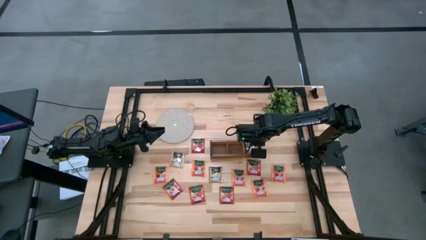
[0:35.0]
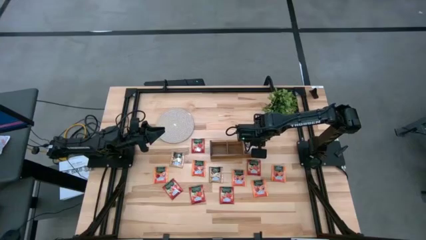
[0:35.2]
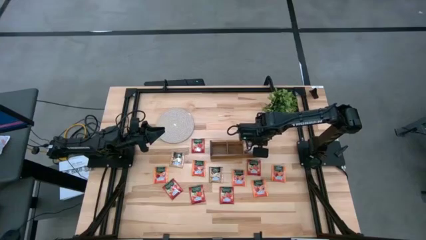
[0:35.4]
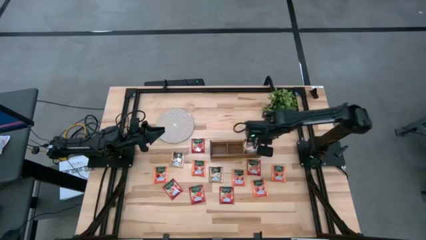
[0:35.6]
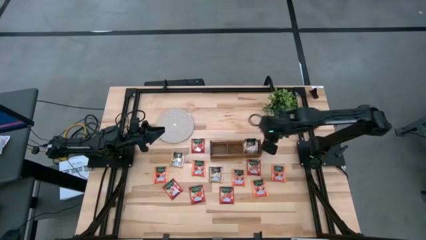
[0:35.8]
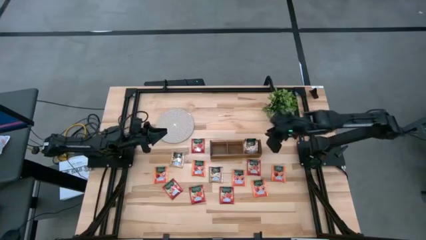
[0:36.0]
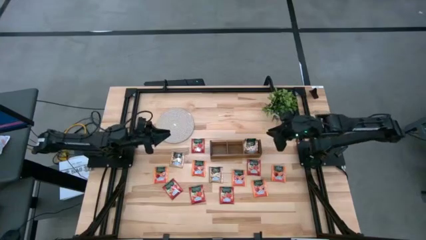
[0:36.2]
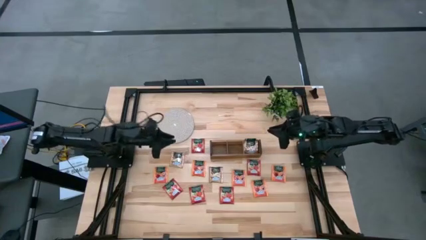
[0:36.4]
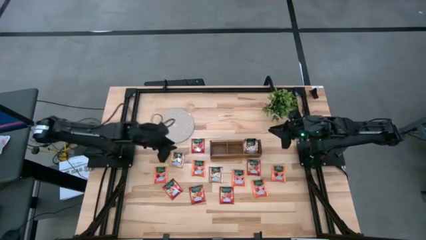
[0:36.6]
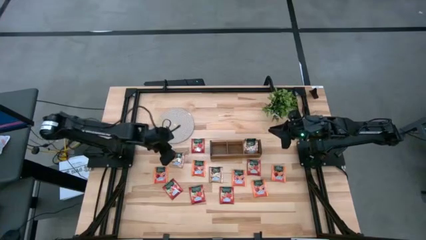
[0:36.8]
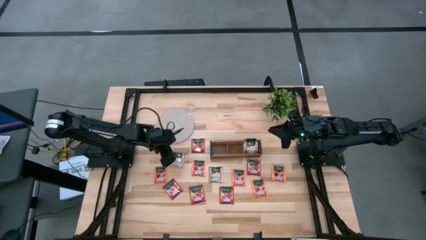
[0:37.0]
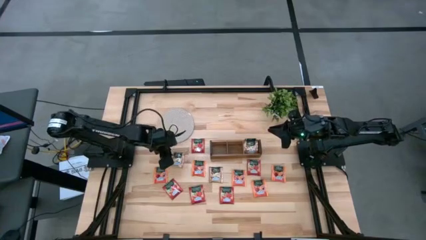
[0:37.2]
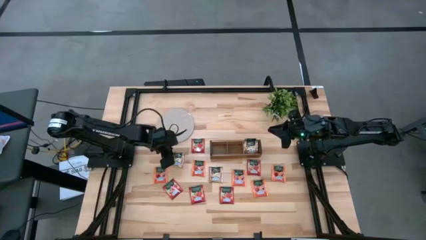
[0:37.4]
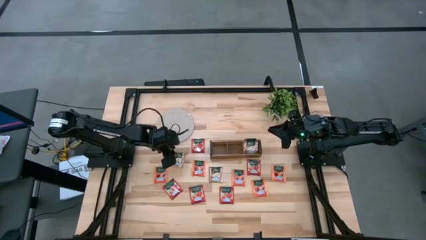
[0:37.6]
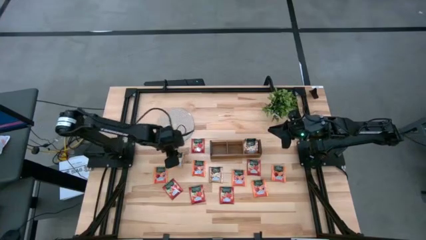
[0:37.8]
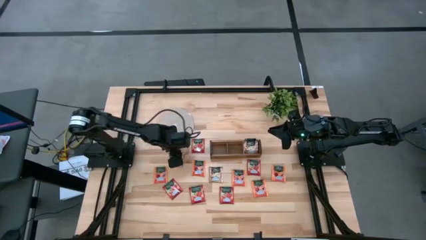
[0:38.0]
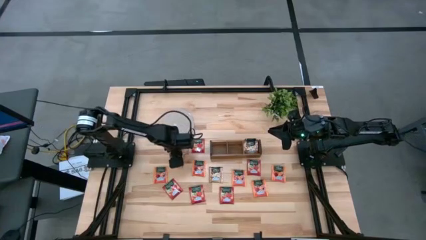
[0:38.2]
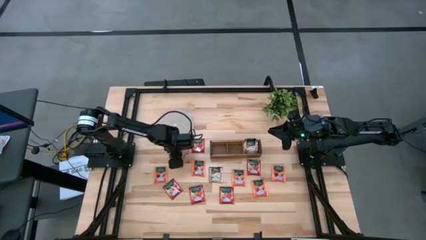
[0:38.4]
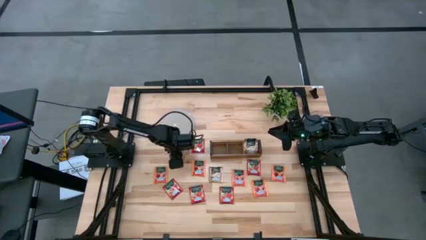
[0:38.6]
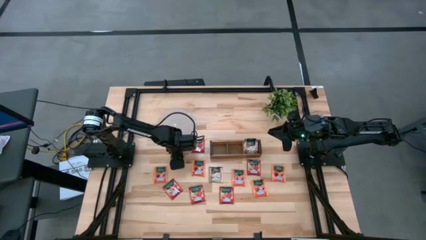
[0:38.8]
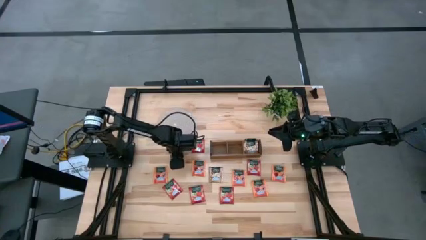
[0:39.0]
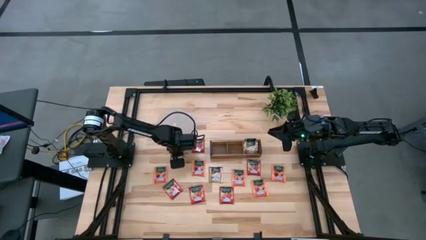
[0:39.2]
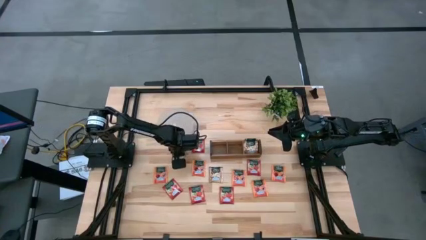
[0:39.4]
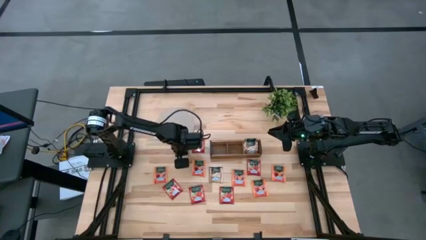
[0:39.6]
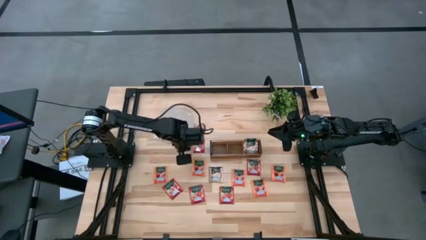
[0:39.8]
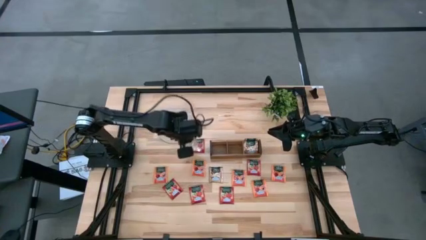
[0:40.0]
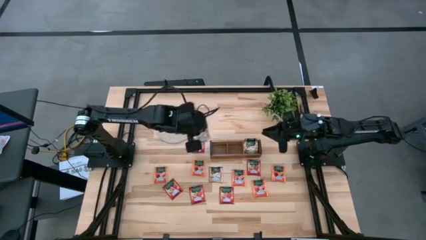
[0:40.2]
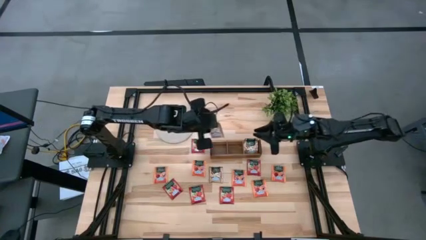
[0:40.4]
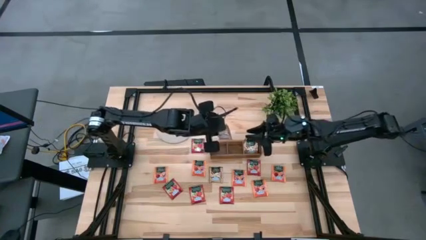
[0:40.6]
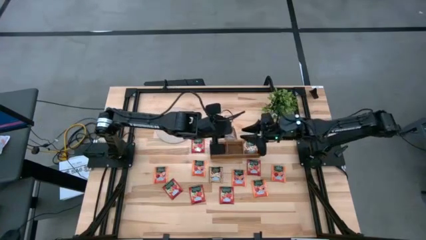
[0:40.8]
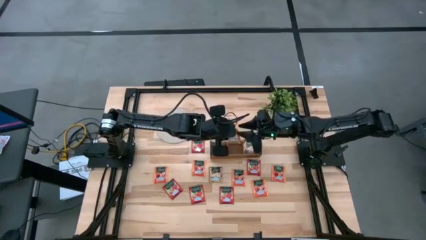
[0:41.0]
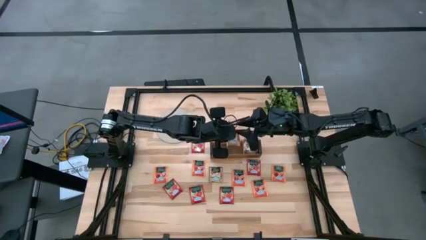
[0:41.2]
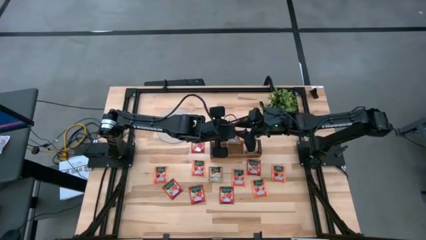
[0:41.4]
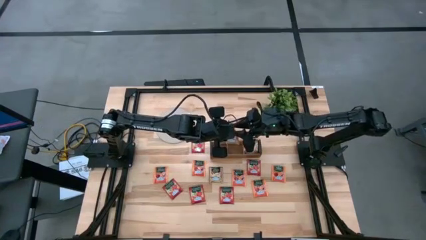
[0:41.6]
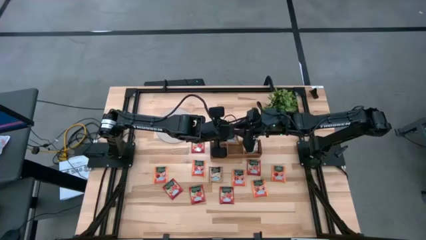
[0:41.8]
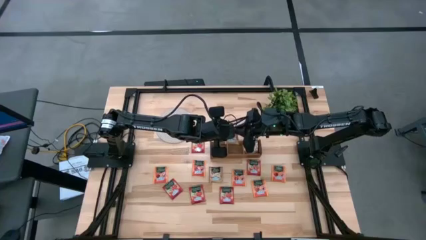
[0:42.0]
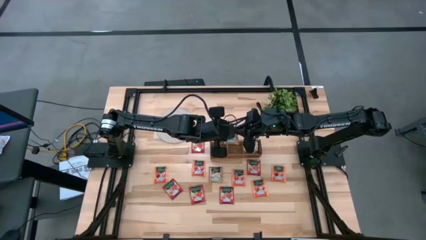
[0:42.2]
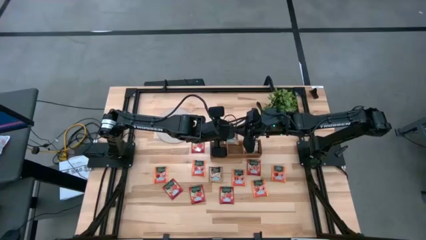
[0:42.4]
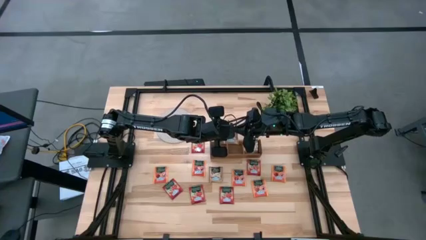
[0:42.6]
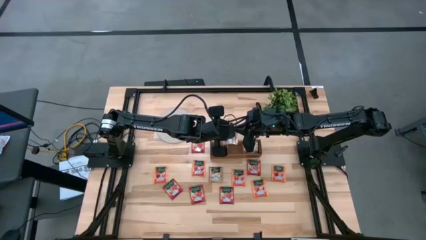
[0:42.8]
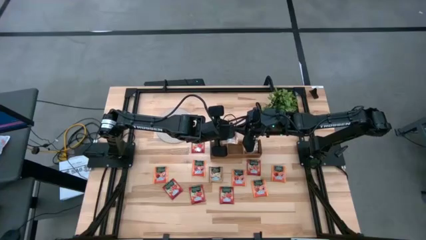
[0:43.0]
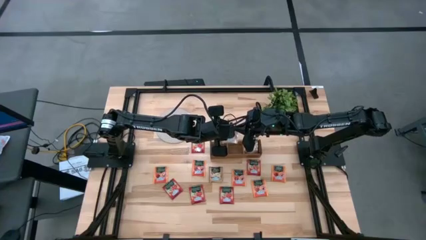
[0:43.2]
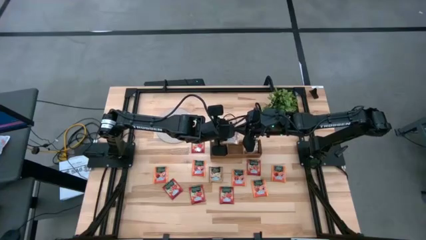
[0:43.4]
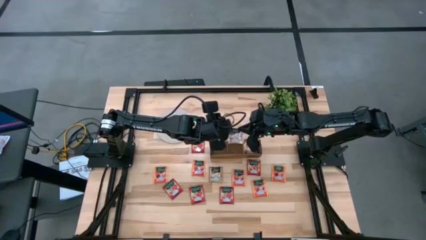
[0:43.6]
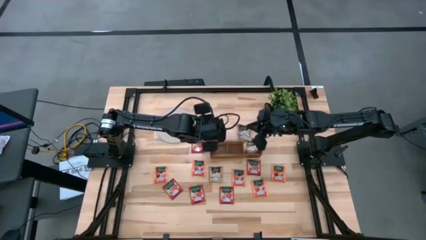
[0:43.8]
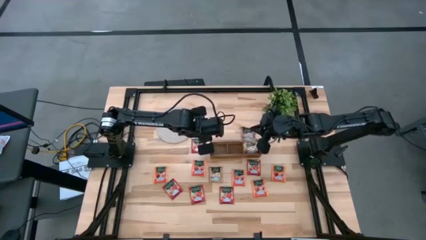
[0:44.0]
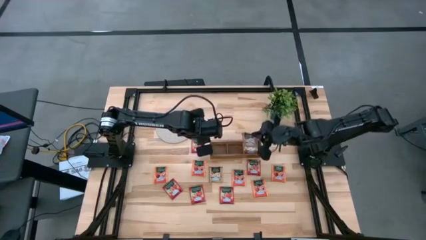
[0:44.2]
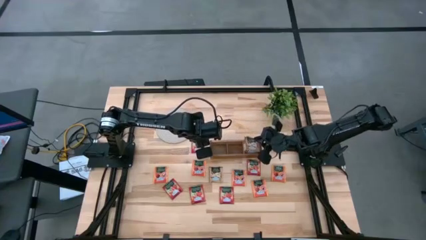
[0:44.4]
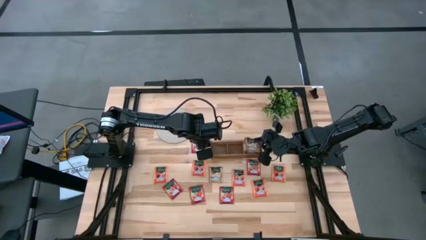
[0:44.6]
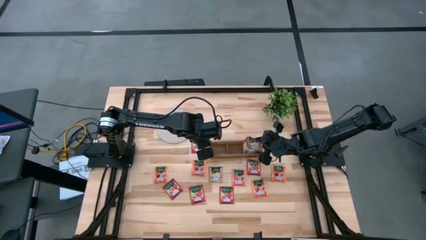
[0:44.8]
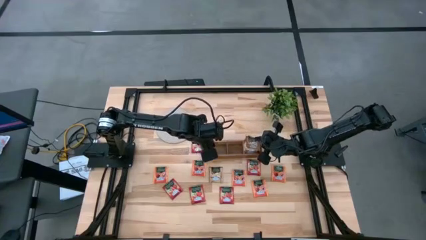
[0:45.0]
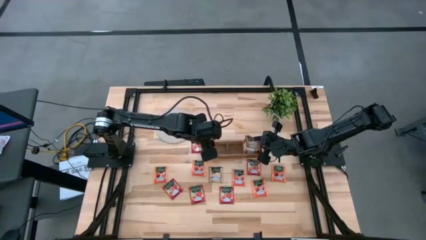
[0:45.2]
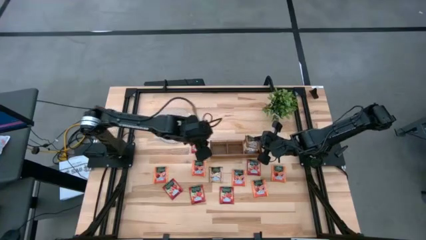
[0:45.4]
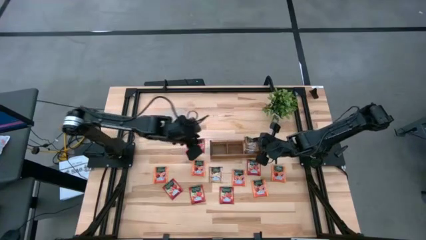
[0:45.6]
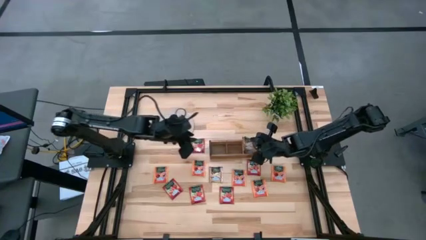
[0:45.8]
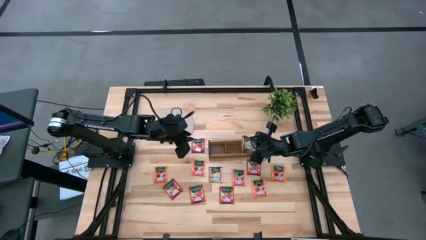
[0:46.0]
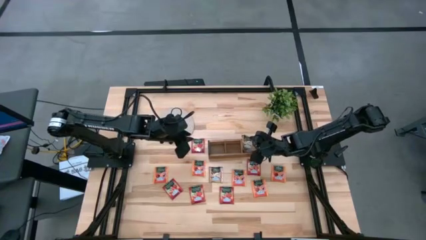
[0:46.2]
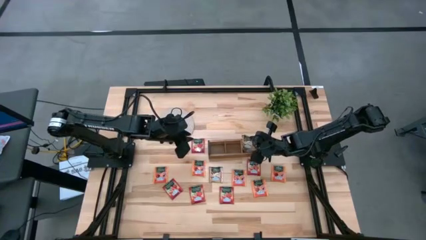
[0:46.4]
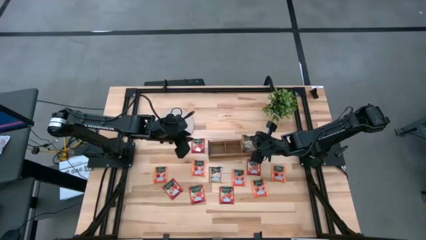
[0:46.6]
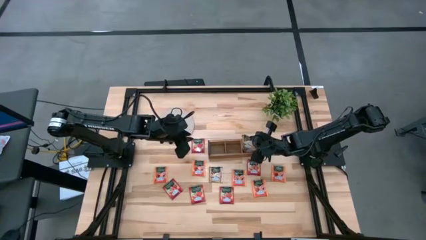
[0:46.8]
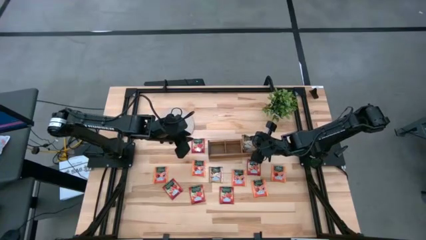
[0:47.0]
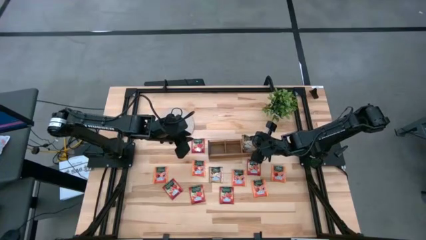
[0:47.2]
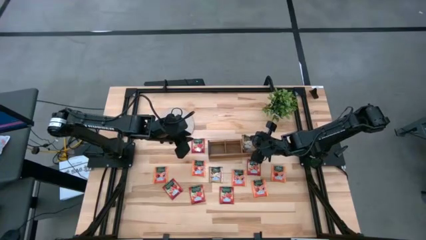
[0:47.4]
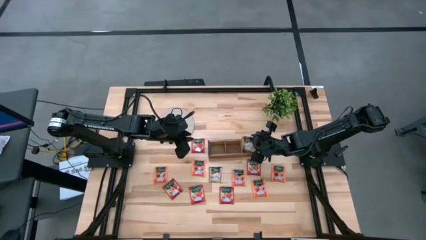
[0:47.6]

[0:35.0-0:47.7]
Task: Pick & Place Tea
Put the yellow tea bag into the right section of the wooden organizer

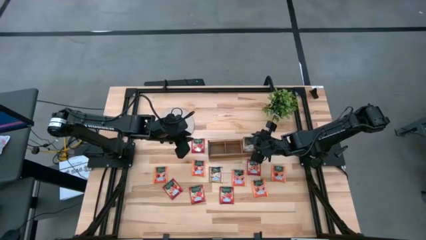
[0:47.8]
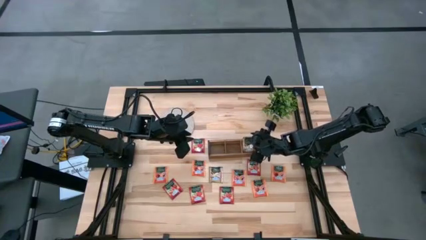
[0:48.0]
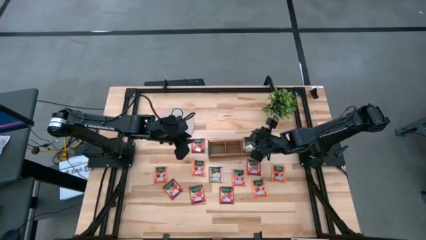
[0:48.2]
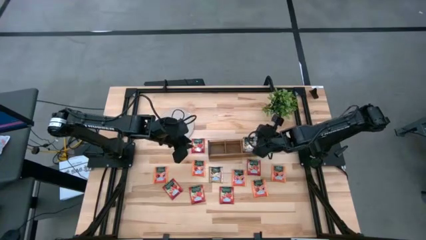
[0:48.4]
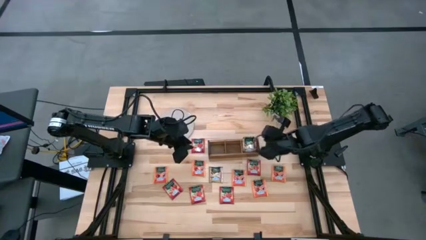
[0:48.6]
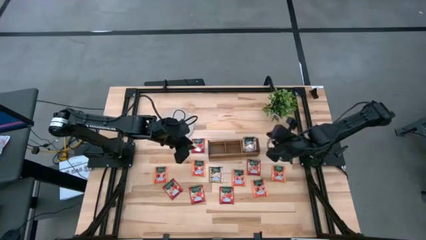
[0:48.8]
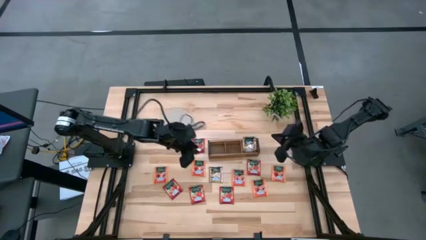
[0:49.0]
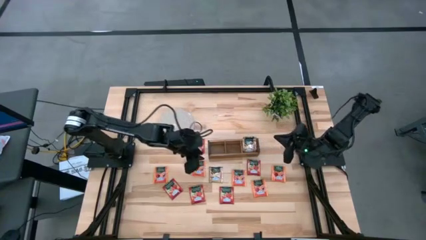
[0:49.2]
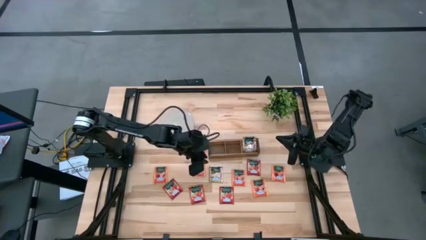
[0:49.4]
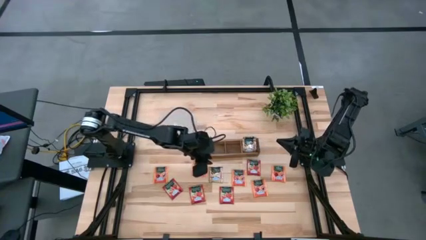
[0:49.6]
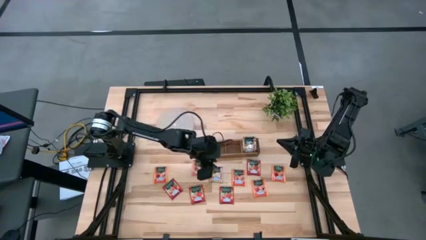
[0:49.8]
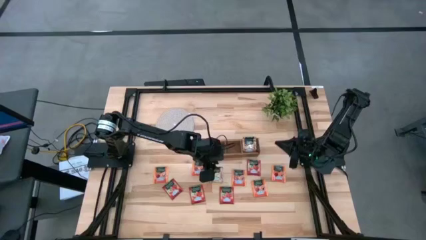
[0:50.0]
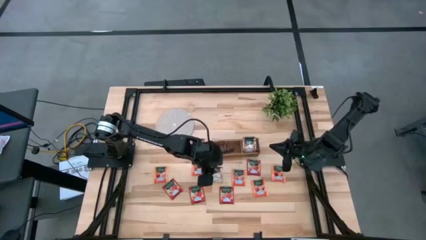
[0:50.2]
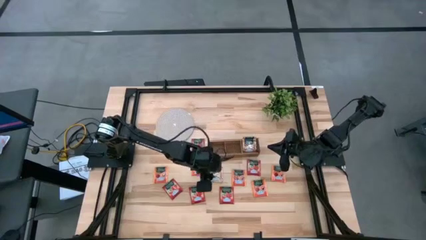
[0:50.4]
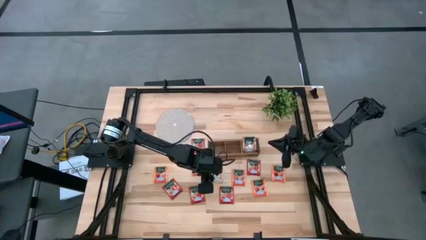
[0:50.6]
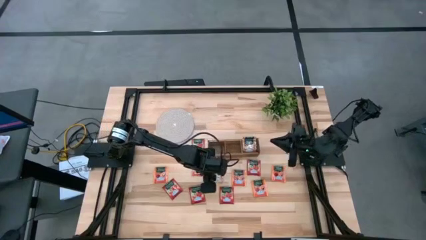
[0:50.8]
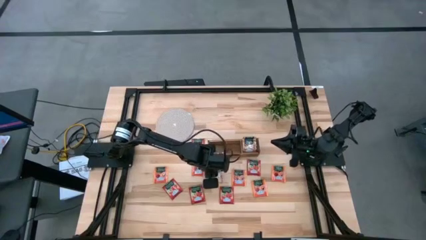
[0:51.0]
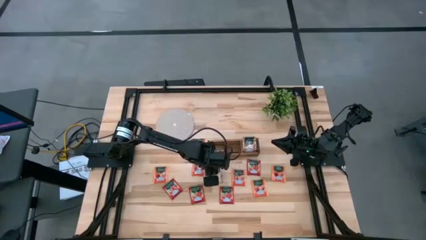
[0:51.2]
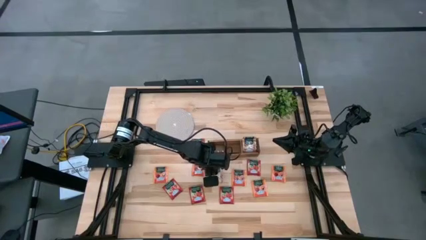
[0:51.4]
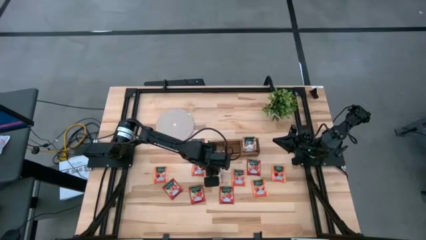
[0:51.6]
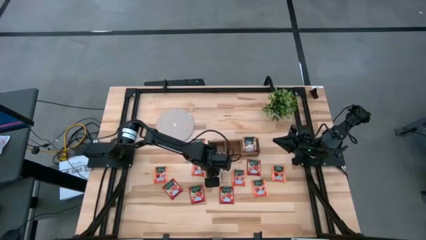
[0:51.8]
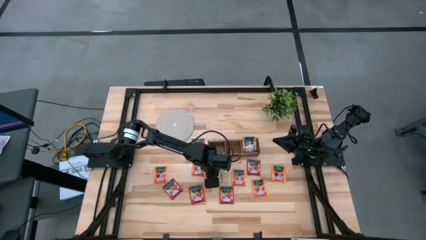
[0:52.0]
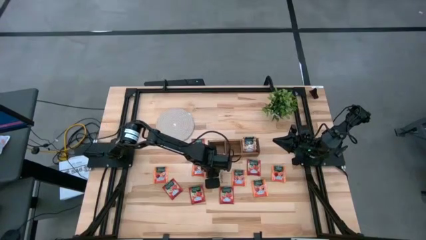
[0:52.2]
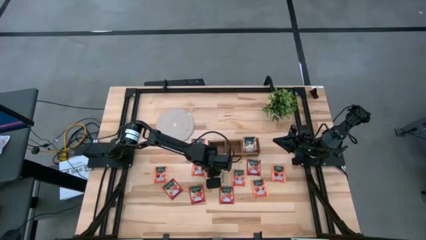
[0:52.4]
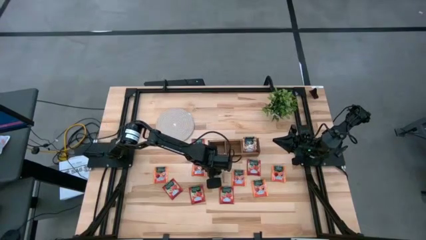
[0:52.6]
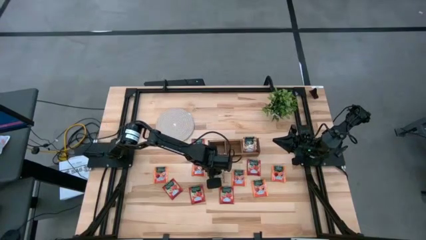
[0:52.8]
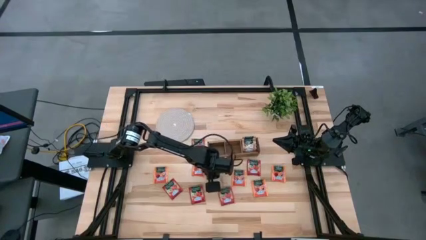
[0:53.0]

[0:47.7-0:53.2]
Put the yellow tea bag into the right section of the wooden organizer
